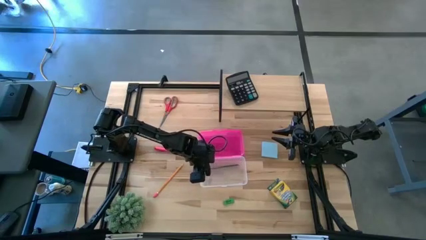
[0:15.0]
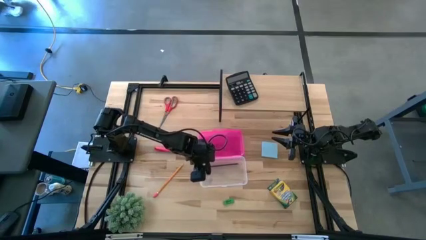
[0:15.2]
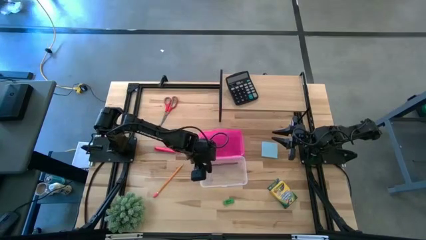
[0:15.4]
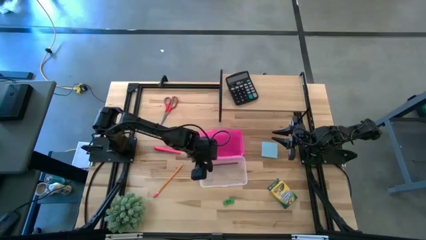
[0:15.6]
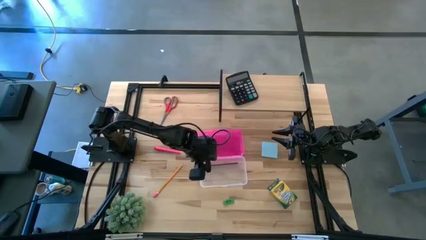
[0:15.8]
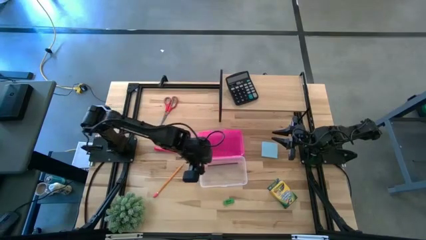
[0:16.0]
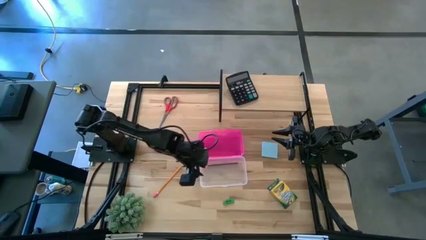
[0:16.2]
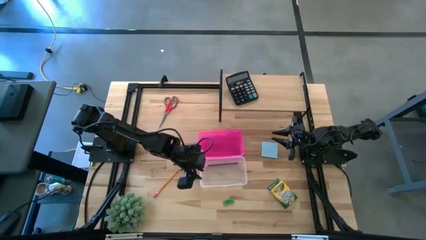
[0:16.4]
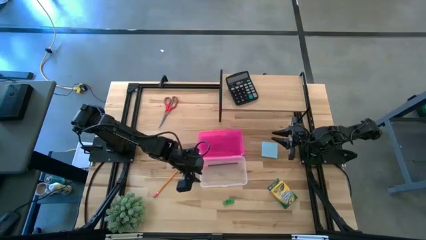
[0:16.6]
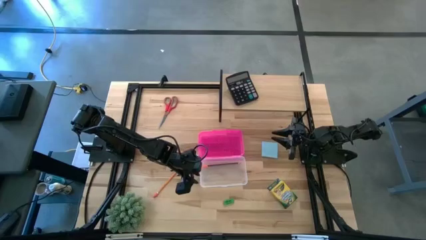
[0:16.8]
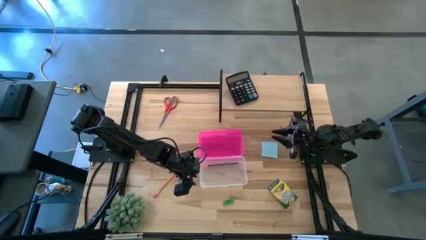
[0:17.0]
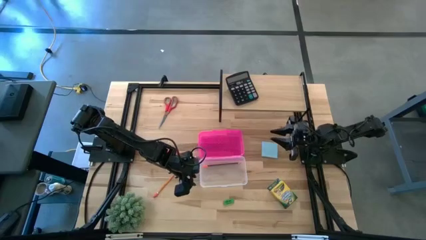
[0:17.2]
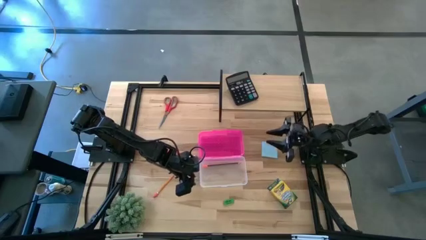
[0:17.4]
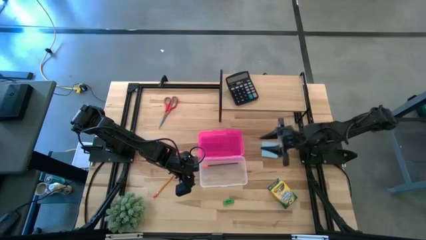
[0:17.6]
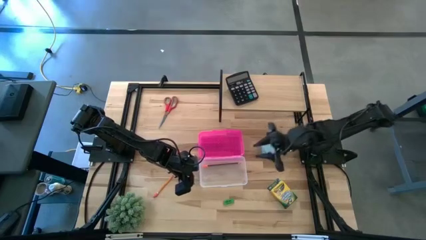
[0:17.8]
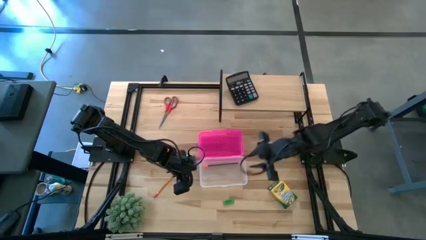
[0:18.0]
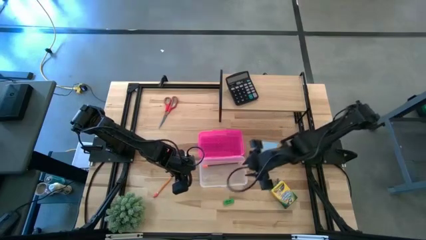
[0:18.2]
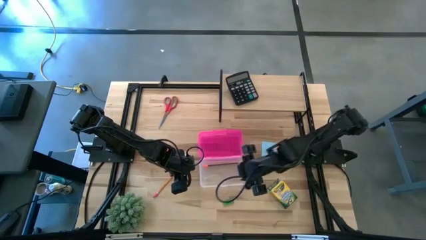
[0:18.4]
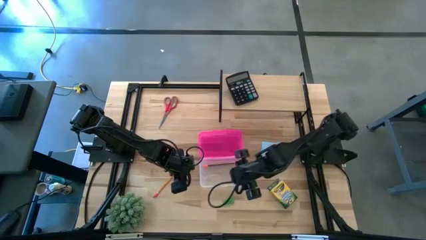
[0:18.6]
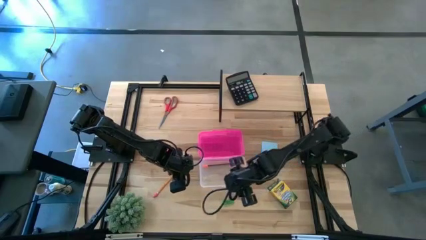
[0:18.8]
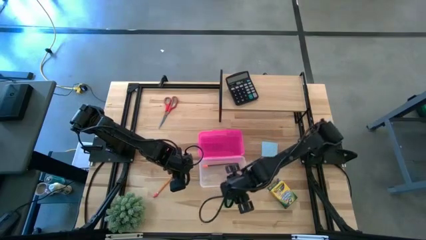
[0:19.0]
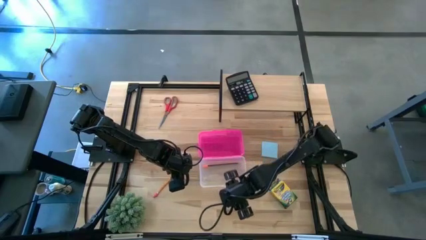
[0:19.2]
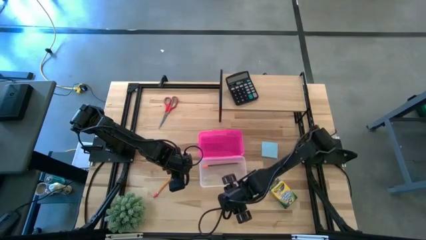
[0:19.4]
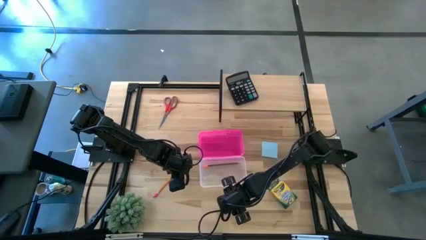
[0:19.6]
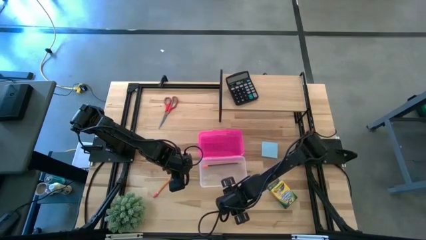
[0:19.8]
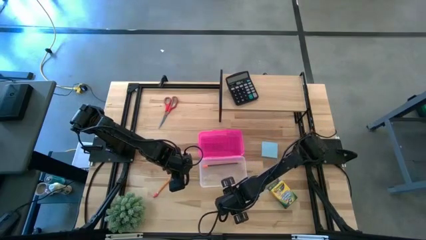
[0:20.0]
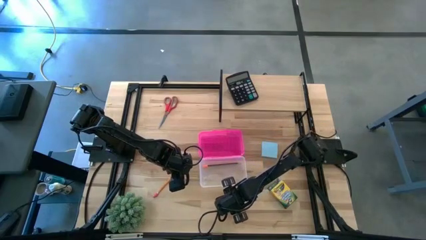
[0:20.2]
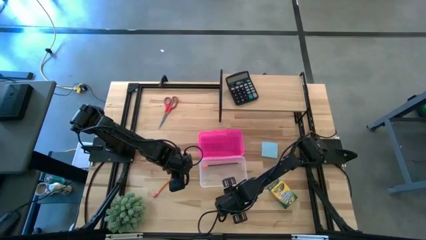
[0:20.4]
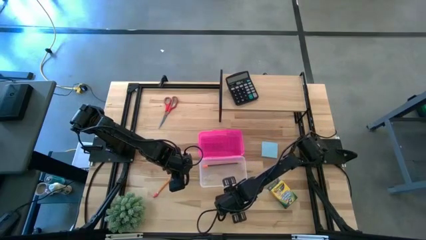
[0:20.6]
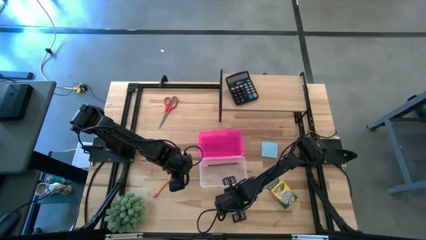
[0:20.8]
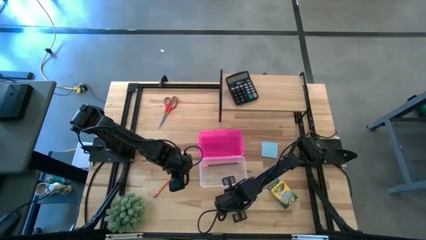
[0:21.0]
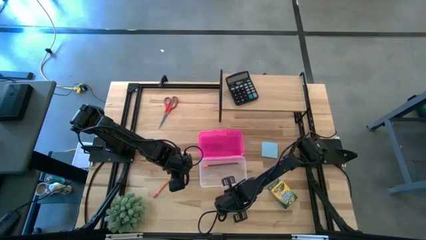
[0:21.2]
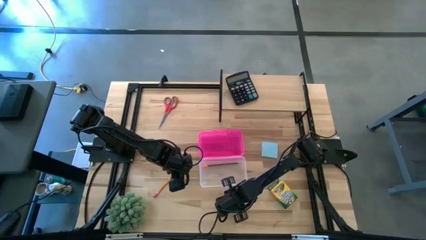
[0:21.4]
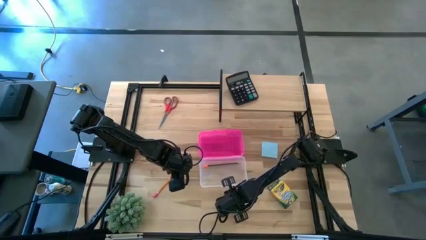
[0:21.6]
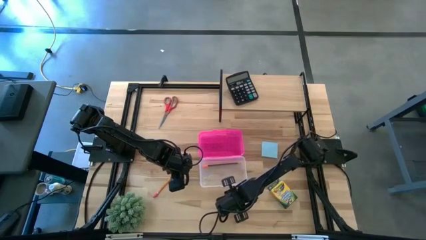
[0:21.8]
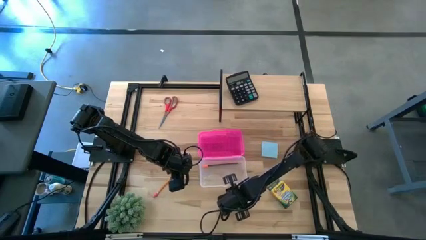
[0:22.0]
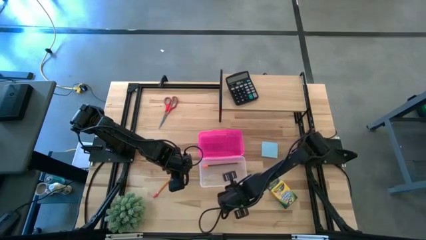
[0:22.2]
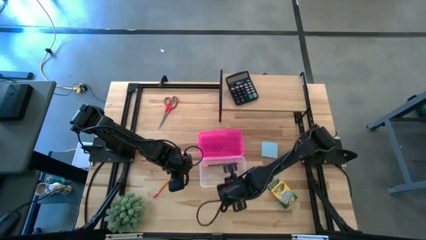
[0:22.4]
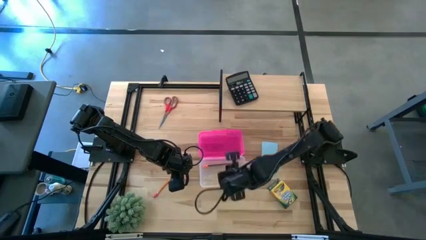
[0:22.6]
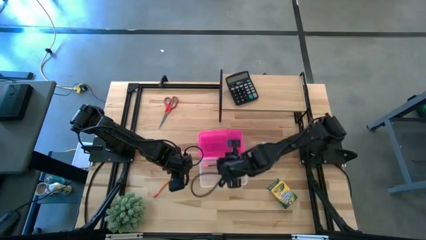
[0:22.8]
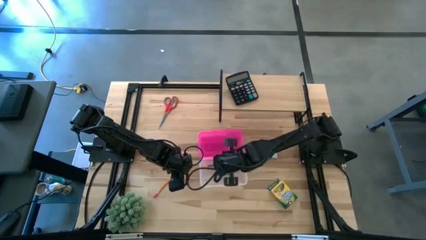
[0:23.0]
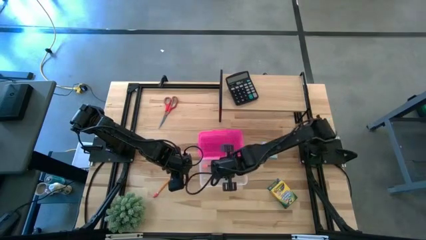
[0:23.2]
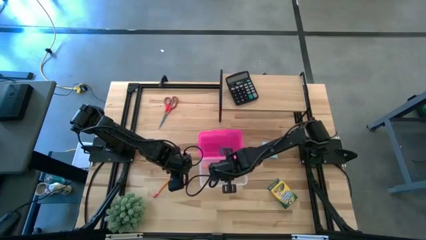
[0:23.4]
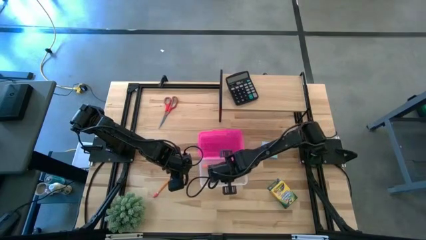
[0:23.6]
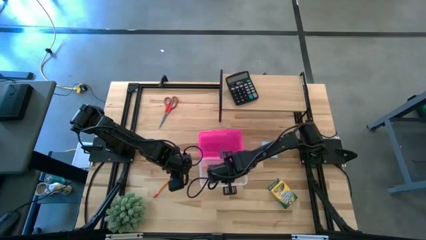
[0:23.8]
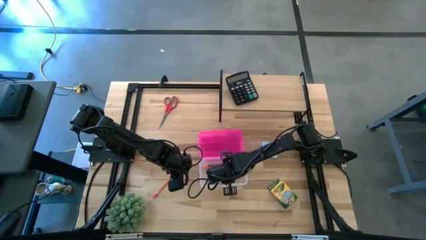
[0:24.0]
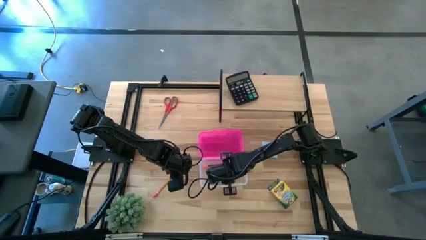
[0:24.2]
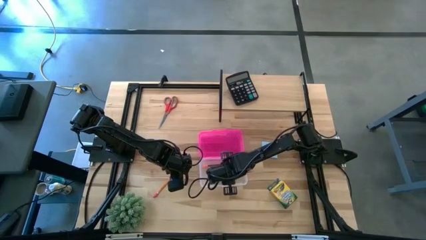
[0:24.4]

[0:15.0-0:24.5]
Task: Pack school essentials
Put the green eraser into the transparent box

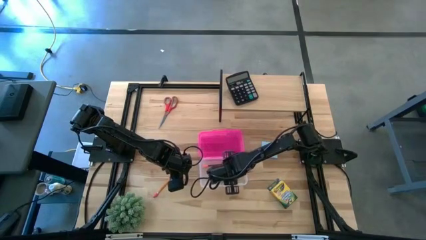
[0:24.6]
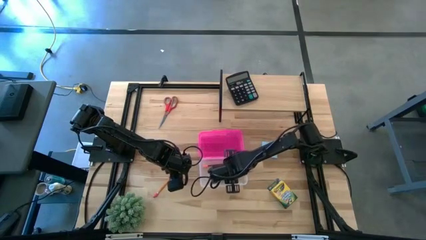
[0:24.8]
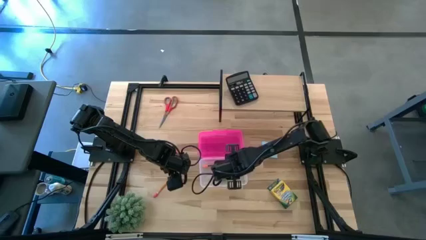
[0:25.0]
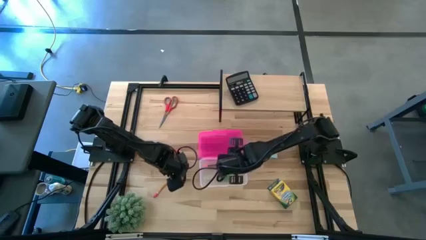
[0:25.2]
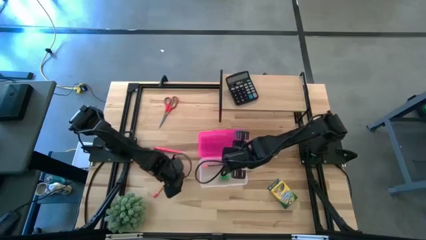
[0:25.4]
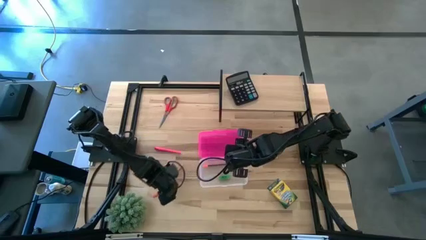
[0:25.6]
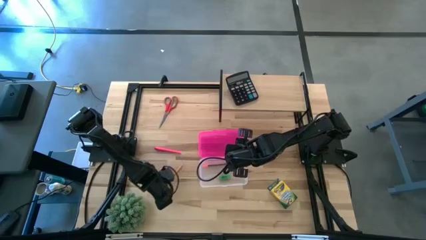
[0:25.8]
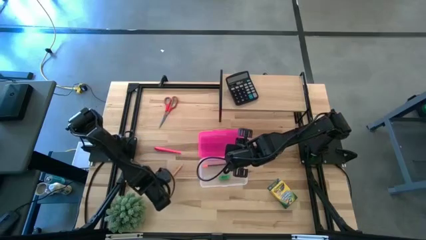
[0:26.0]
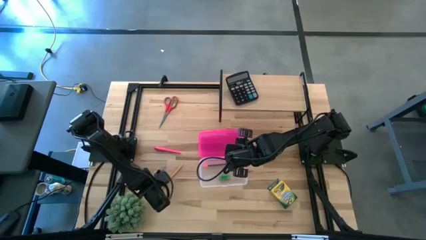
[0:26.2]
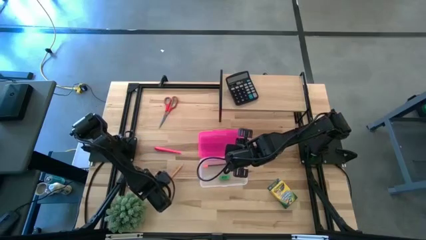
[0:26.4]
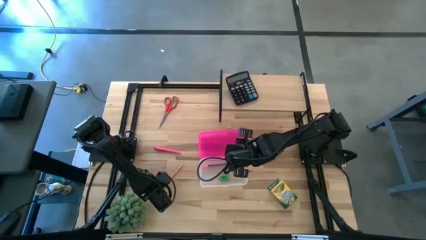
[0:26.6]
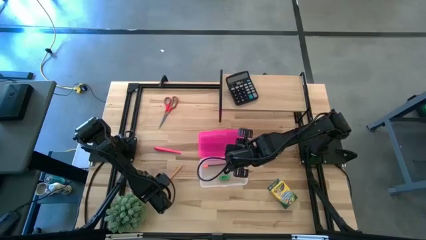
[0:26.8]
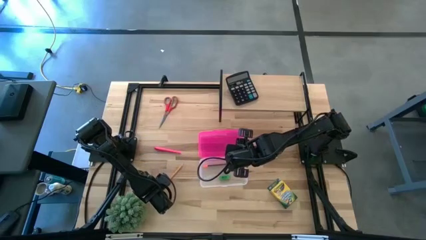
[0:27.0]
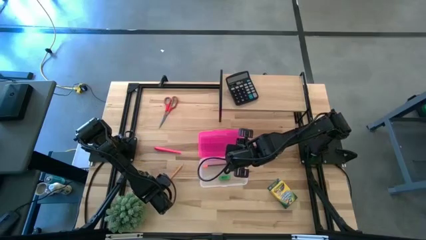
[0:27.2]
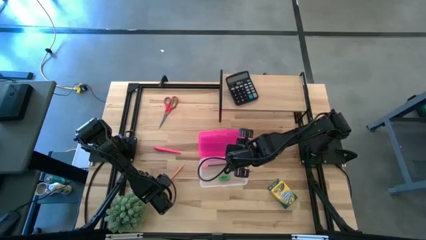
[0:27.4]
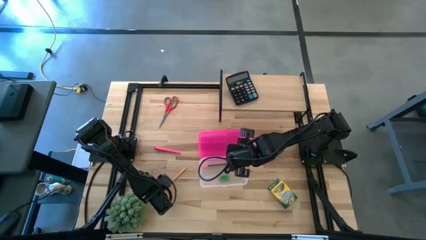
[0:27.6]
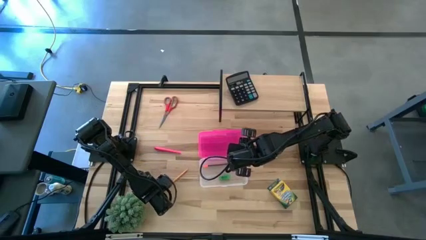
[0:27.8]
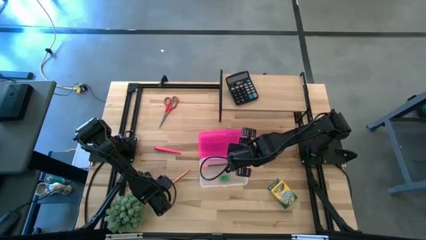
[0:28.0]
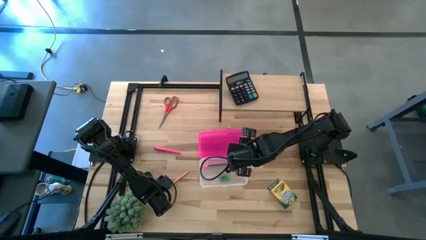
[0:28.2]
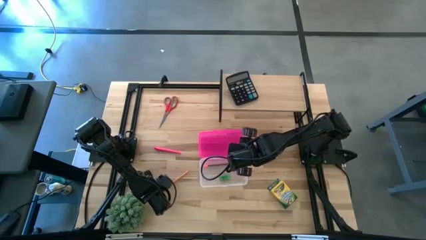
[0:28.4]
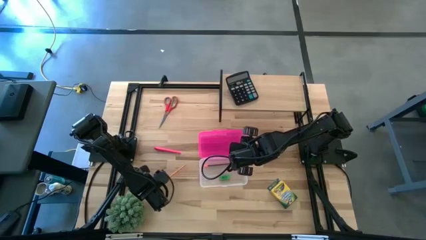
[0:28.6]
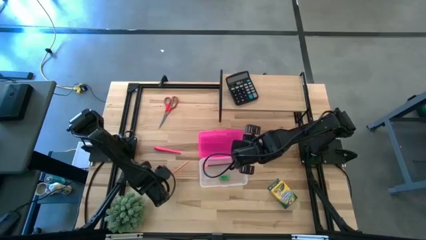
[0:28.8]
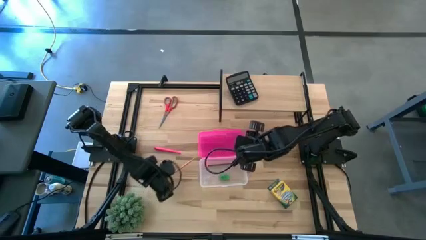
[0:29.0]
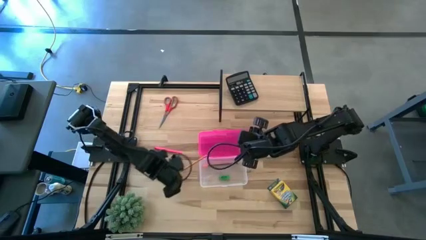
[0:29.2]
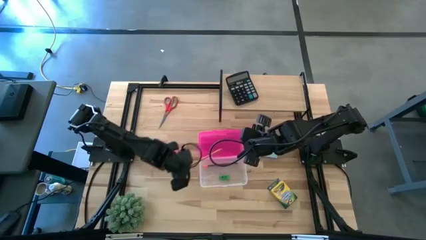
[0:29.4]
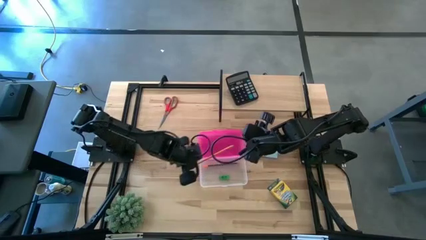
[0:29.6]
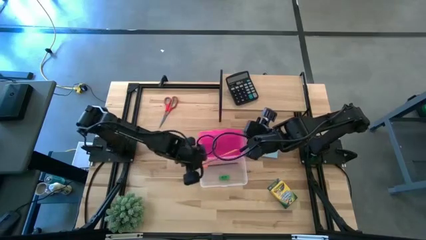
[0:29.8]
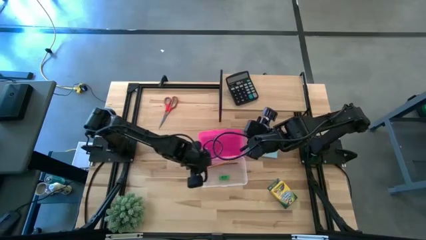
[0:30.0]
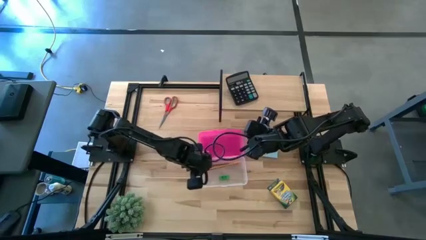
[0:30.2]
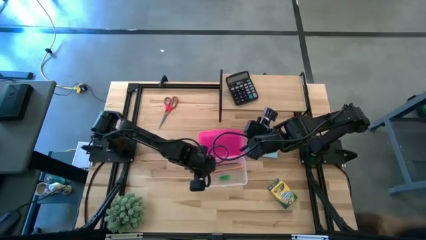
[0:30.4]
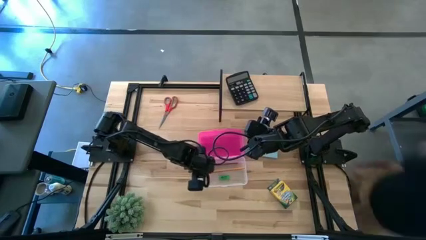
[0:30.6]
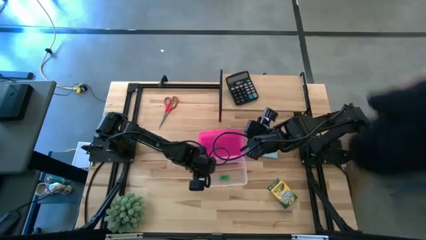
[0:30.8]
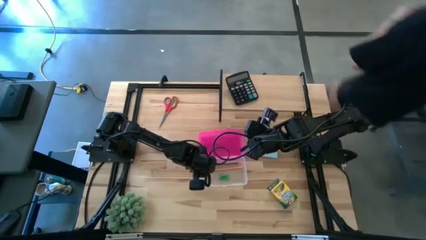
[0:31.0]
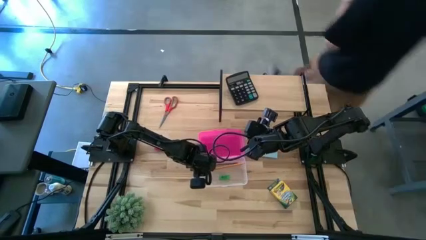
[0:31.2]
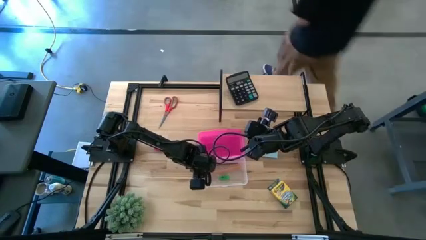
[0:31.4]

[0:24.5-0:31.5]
Put the orange pencil into the transparent box

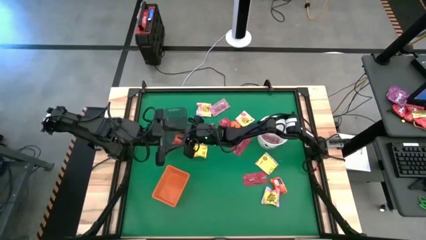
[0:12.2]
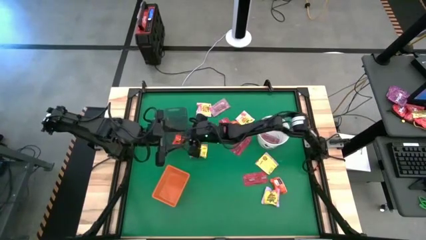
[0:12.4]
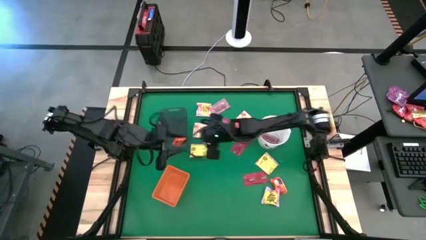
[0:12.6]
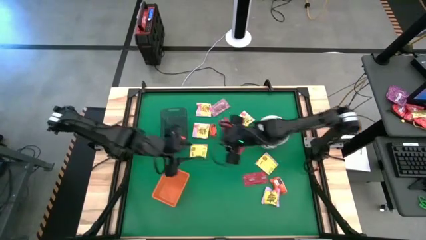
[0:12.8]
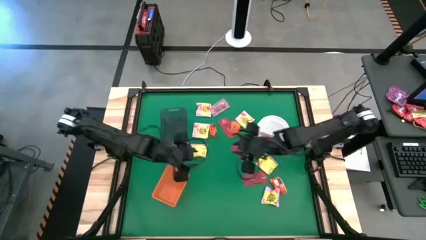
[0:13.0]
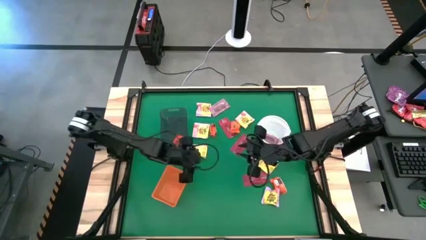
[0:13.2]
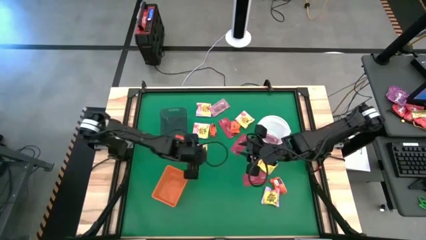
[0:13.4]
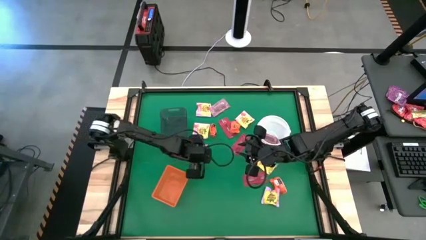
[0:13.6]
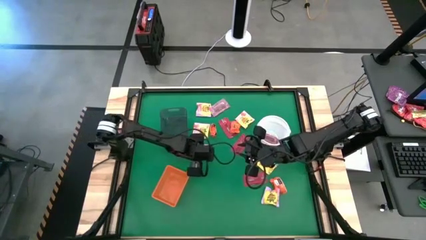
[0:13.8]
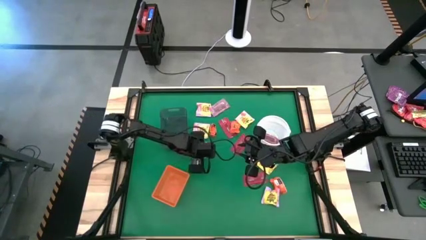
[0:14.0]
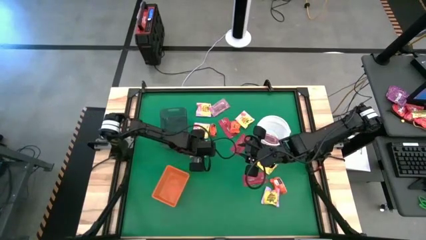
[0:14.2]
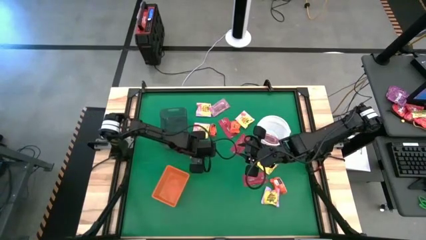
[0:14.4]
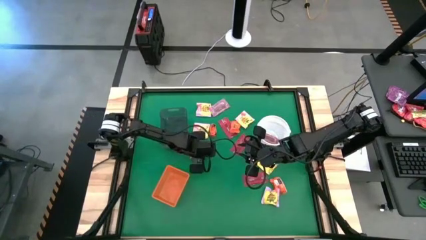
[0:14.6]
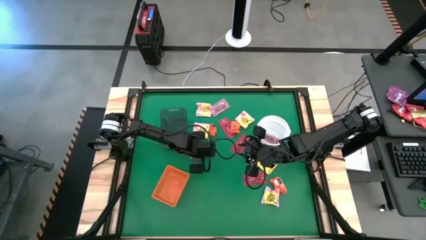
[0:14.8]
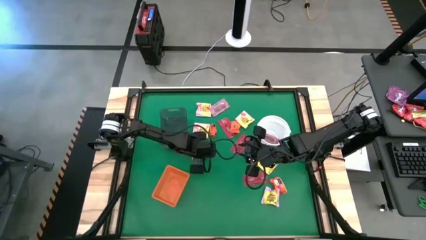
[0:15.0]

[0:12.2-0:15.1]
Task: Sort candy by brand, put in halloween buckets
Put the yellow candy into the orange bin
